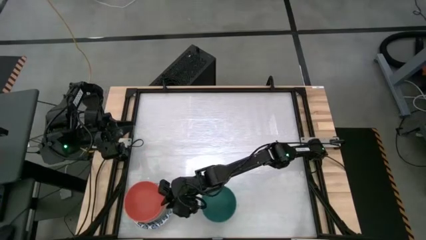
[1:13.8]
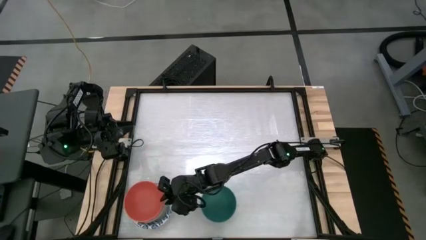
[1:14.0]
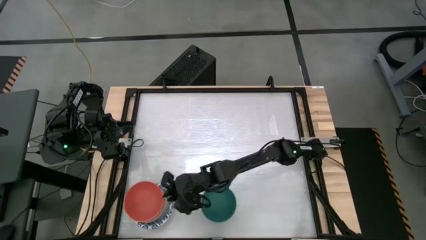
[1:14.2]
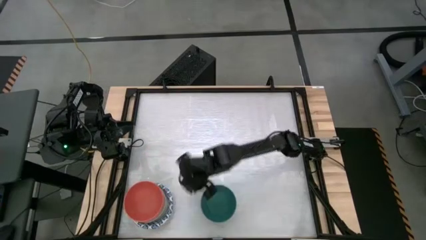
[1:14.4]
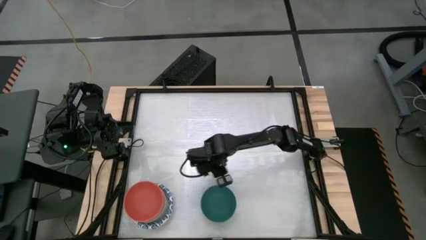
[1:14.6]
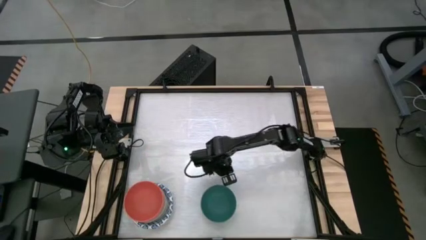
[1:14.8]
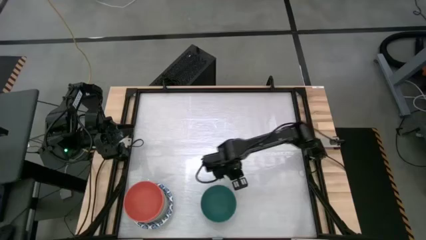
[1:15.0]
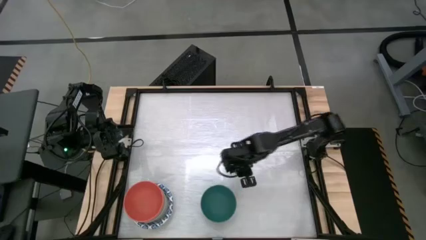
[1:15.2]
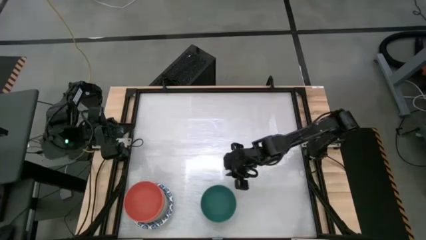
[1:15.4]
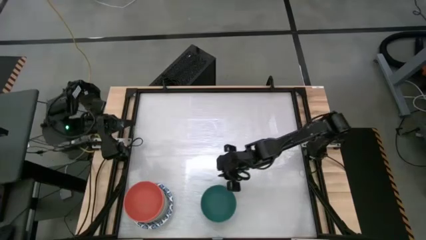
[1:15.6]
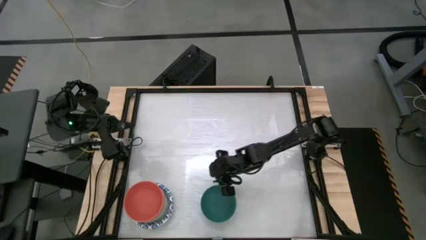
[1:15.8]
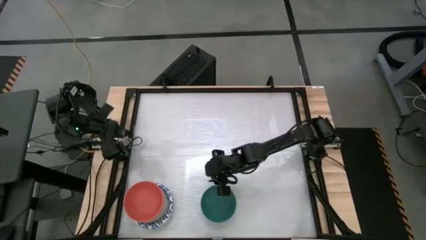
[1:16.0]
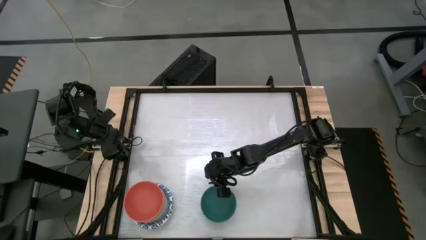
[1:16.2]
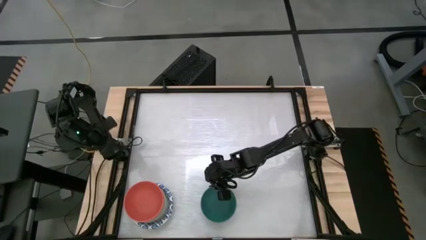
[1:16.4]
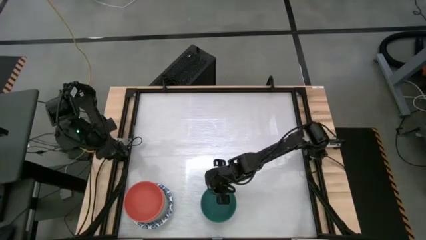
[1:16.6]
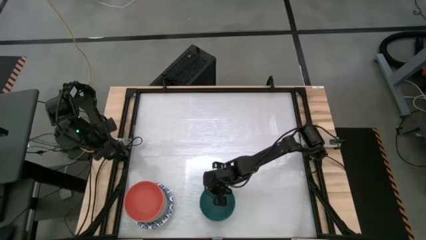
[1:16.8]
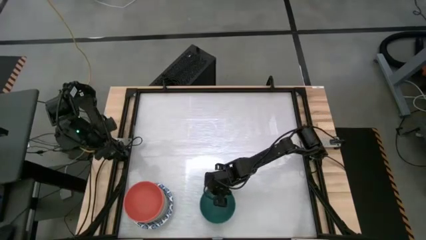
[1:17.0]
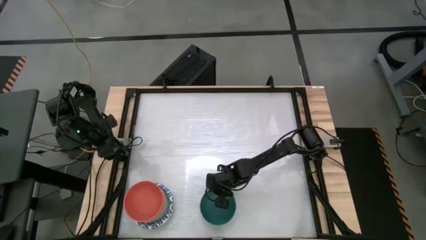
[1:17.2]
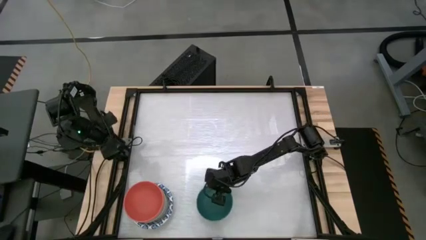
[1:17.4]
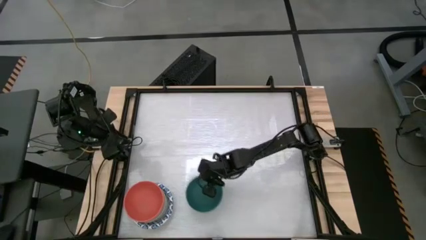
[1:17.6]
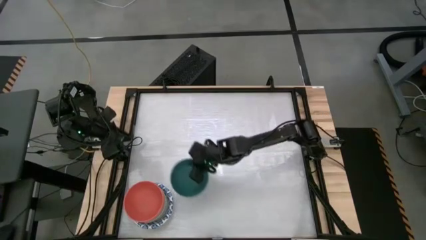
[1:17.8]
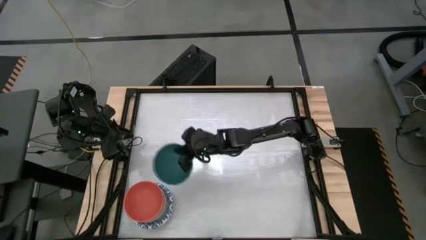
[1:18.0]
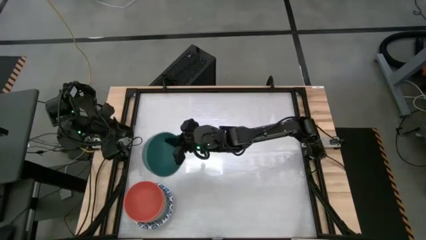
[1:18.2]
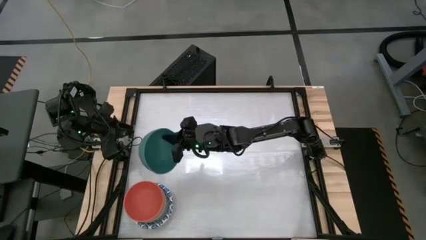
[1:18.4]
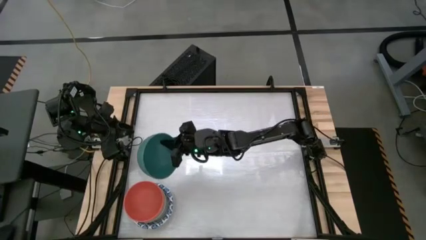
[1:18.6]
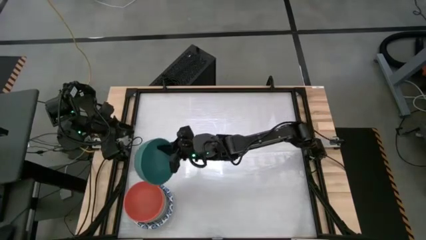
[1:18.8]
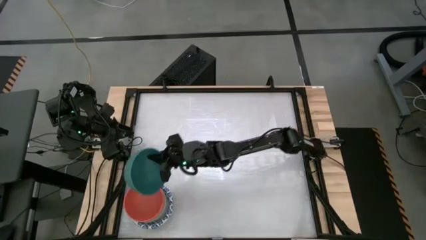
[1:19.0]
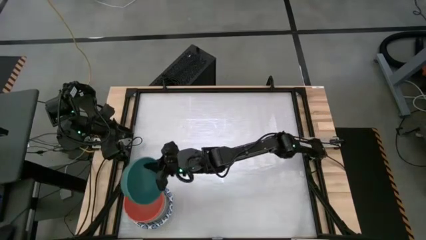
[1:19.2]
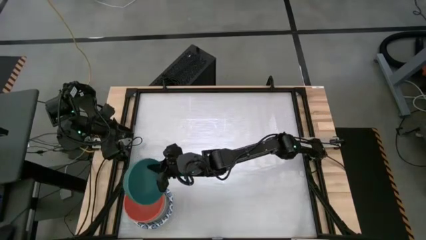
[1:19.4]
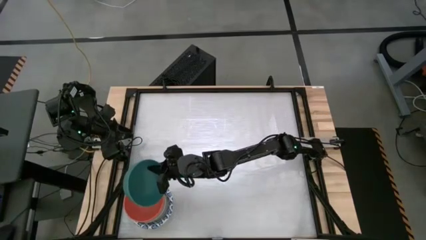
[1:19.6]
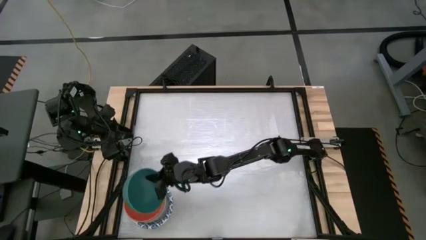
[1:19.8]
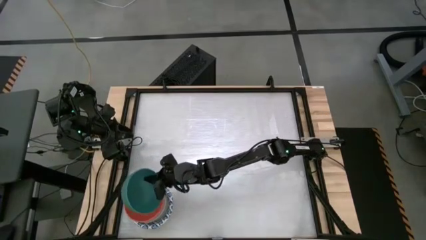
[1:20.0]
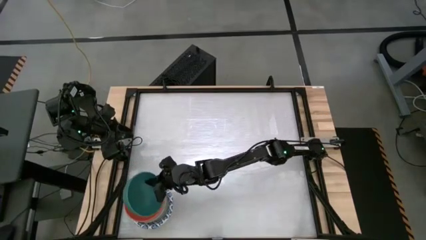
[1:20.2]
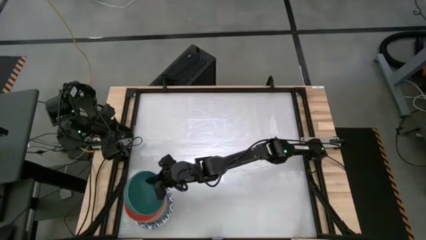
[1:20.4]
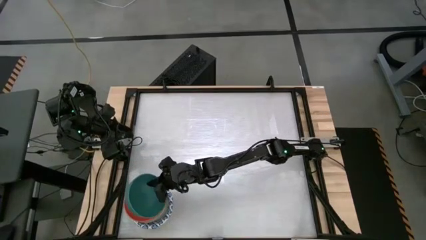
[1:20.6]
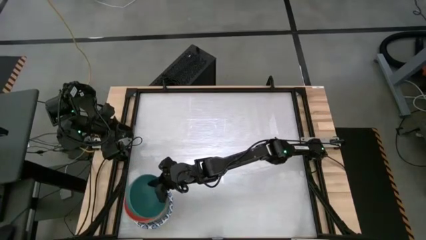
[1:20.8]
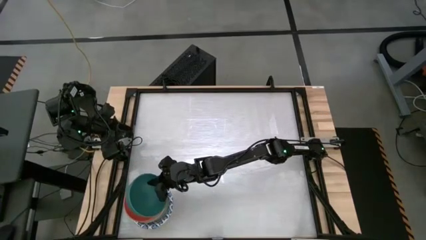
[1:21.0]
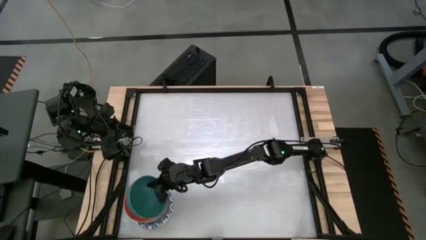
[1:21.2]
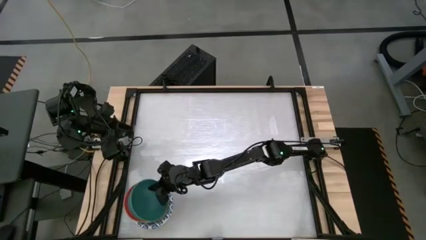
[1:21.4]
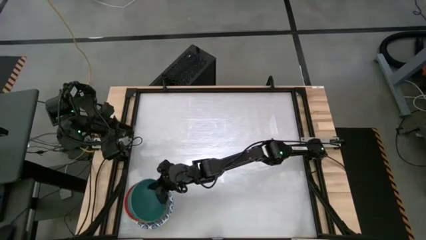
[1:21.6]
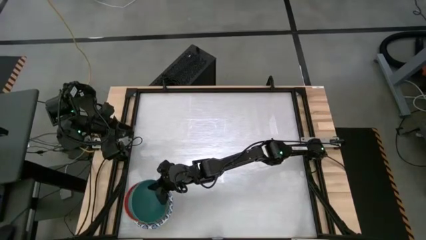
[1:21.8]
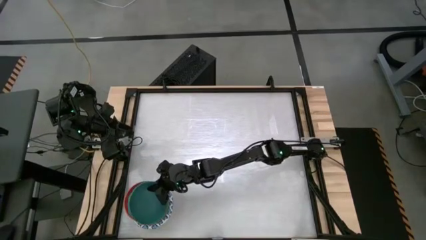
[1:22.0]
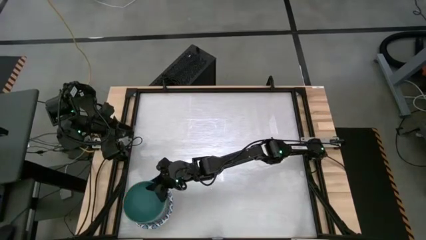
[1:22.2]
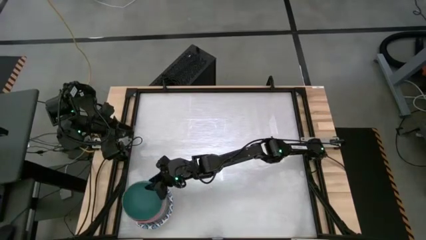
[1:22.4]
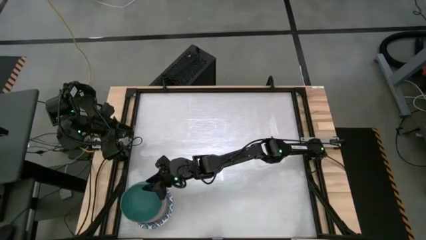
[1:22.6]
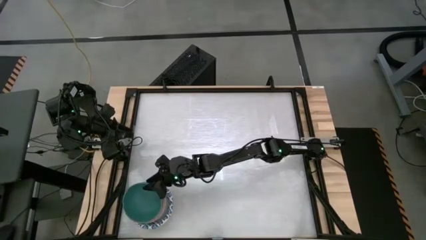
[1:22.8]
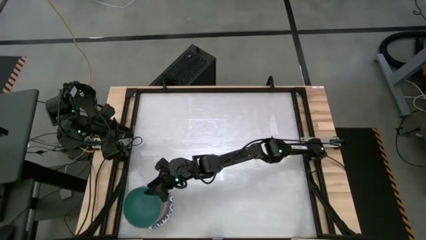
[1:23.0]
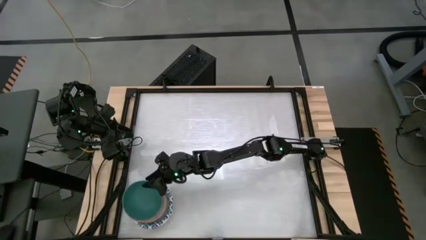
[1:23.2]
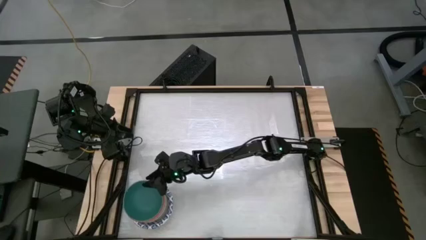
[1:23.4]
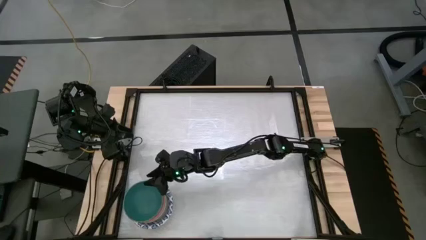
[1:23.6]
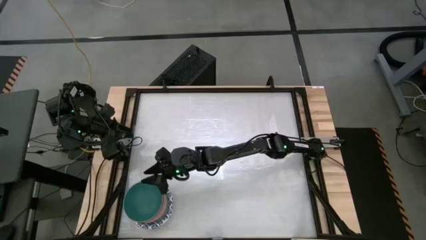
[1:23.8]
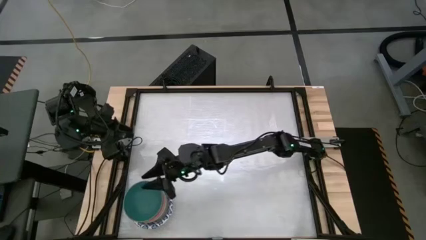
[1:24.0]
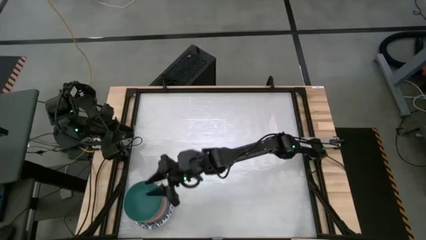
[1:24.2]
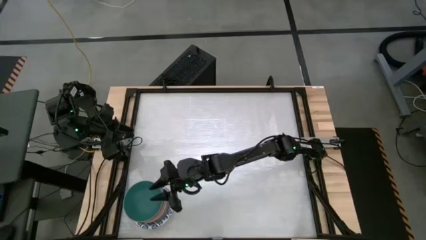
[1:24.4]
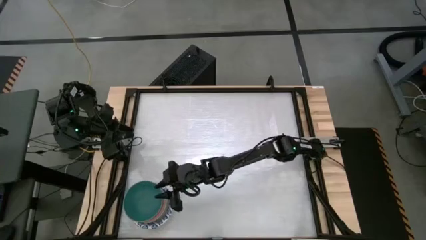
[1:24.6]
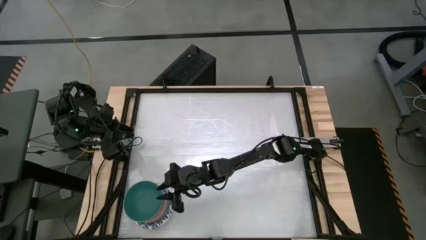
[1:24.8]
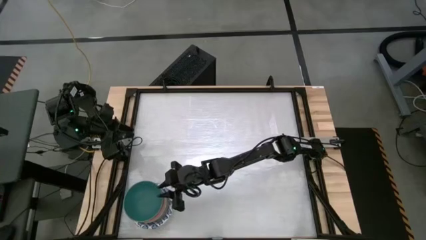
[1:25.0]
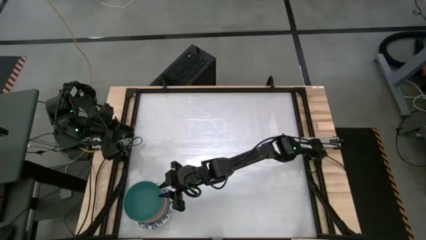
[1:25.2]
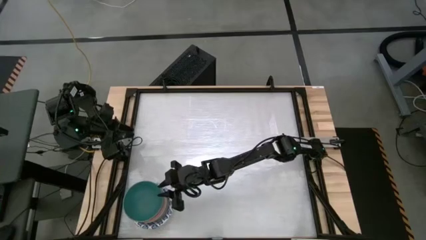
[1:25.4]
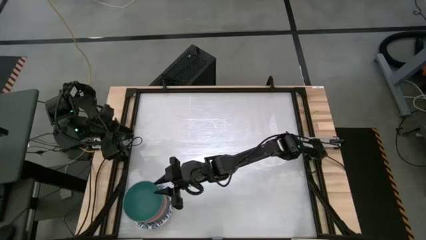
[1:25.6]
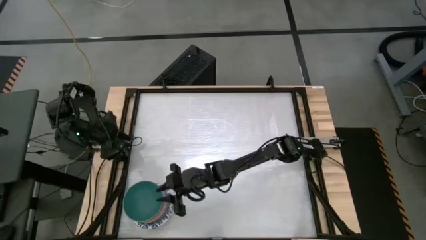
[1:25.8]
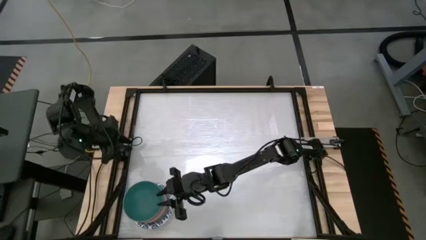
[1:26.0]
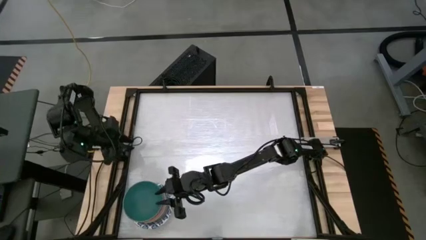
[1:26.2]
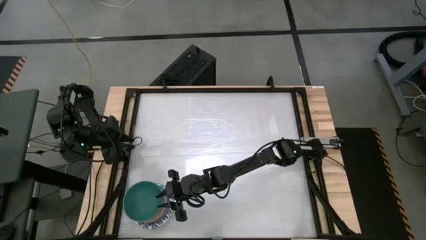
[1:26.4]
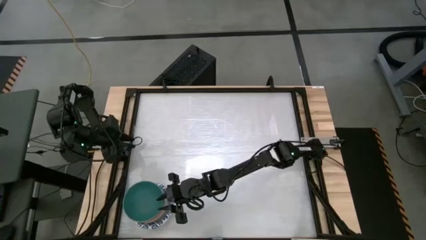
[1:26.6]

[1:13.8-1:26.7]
Stack the green bowl into the red bowl
